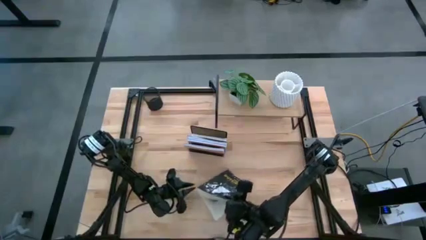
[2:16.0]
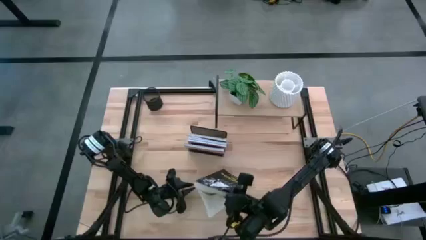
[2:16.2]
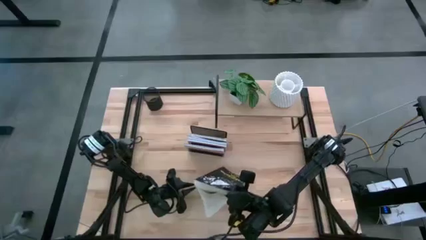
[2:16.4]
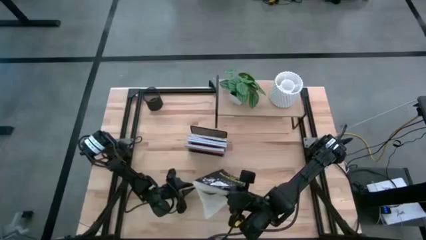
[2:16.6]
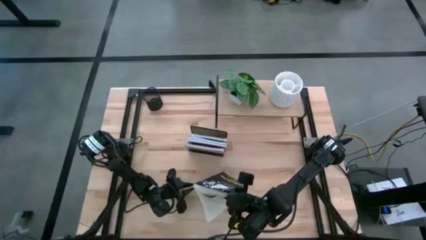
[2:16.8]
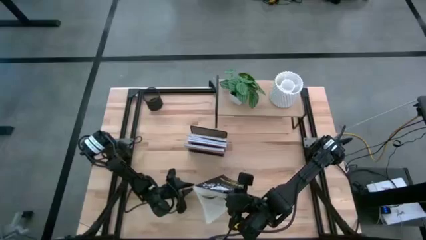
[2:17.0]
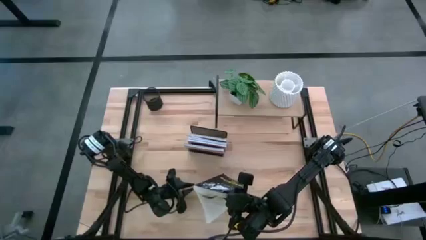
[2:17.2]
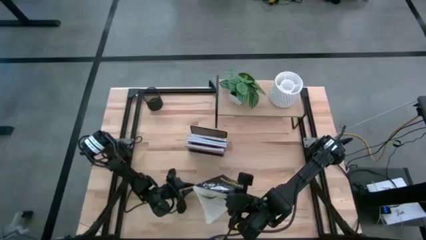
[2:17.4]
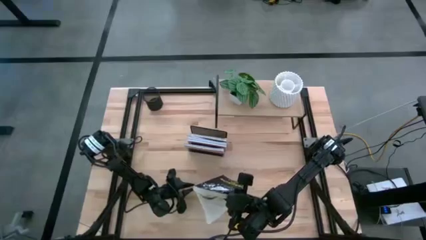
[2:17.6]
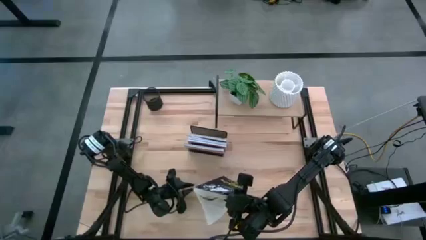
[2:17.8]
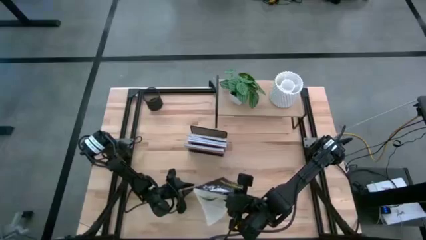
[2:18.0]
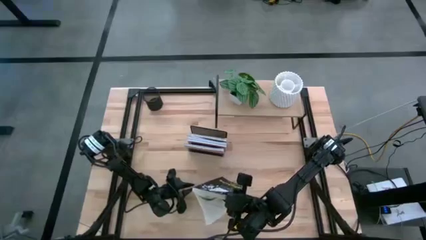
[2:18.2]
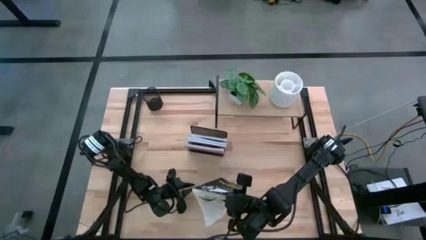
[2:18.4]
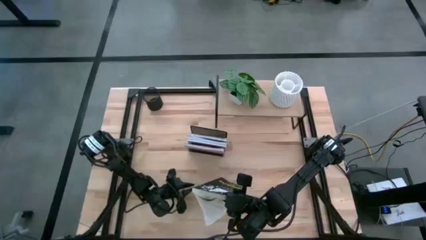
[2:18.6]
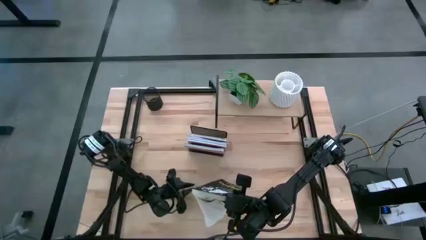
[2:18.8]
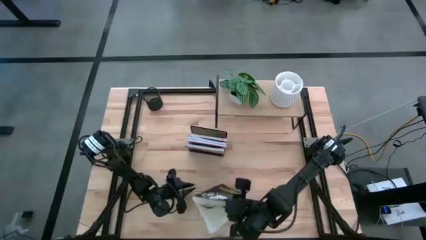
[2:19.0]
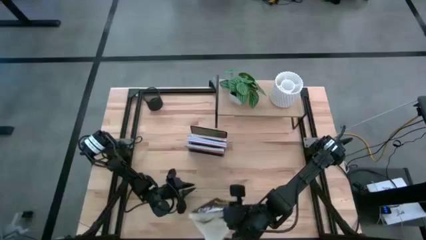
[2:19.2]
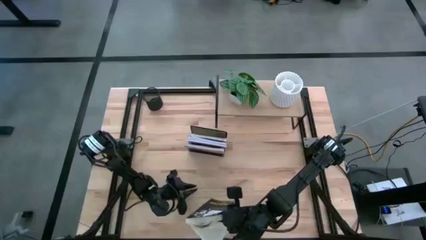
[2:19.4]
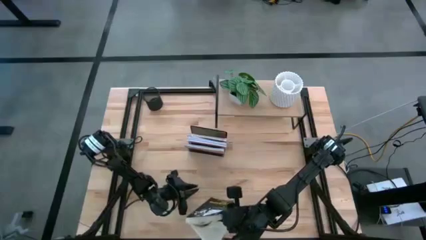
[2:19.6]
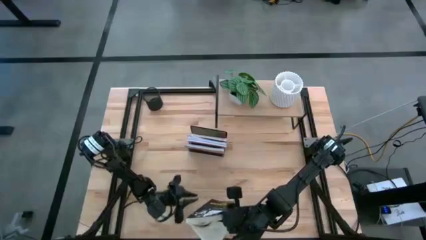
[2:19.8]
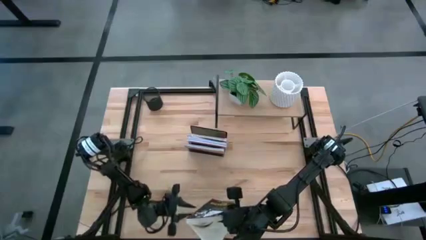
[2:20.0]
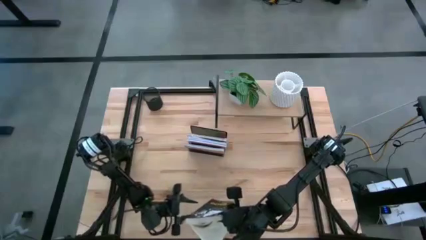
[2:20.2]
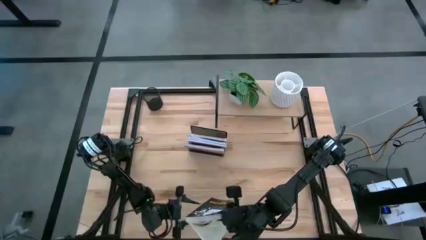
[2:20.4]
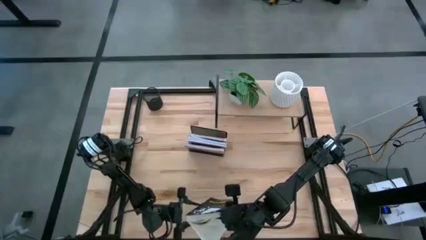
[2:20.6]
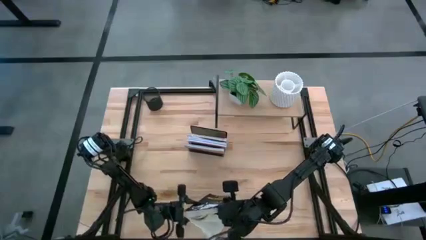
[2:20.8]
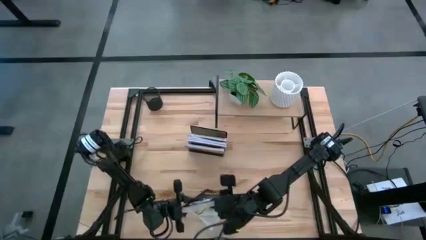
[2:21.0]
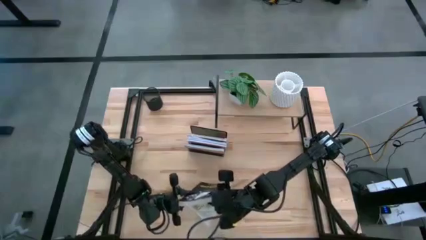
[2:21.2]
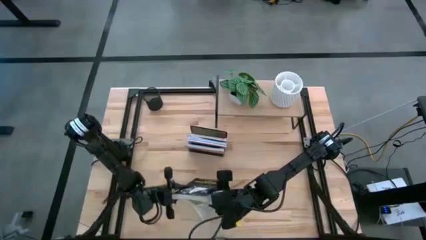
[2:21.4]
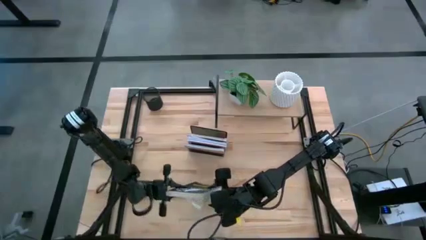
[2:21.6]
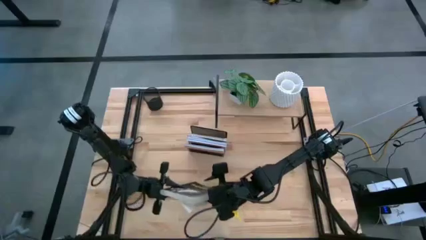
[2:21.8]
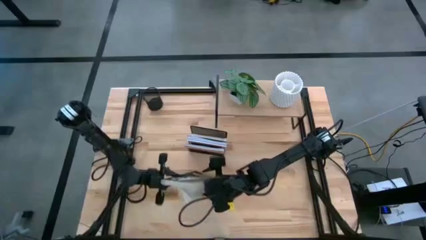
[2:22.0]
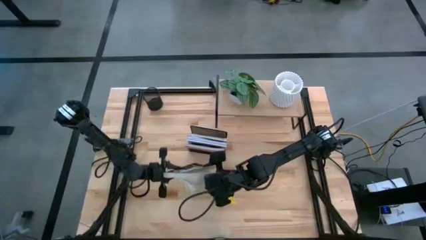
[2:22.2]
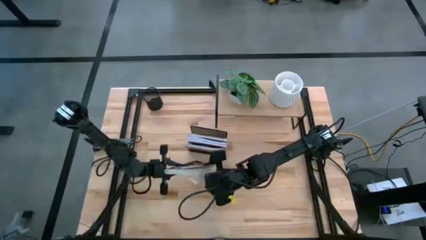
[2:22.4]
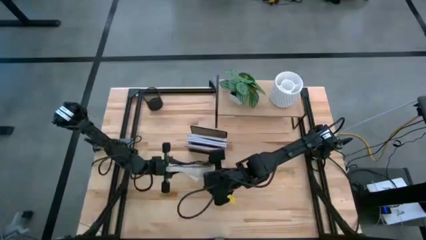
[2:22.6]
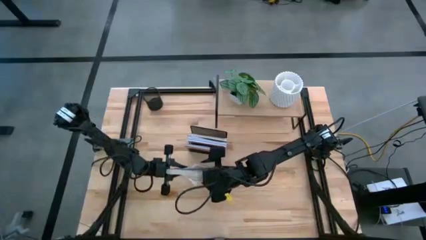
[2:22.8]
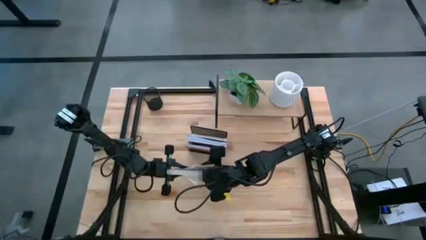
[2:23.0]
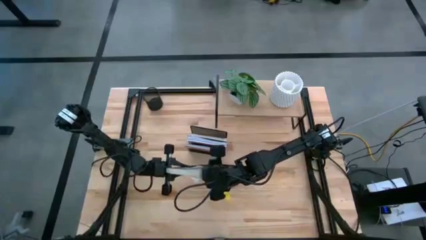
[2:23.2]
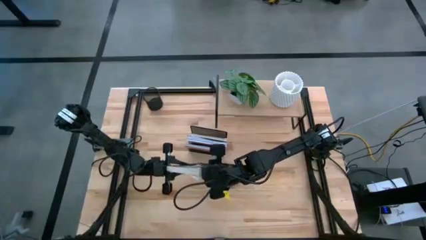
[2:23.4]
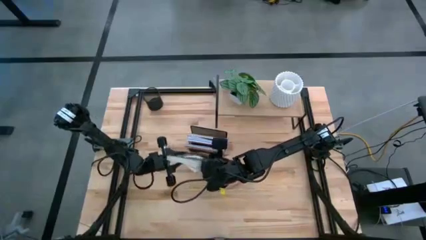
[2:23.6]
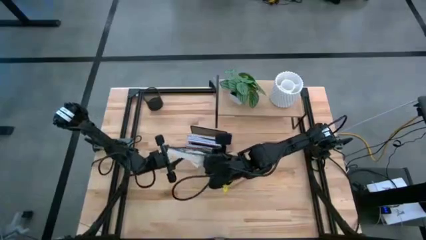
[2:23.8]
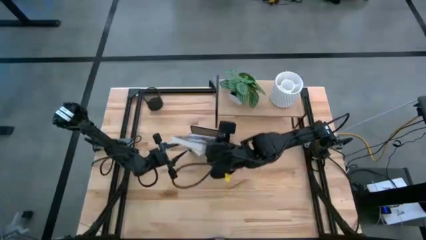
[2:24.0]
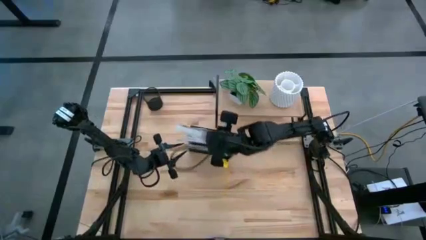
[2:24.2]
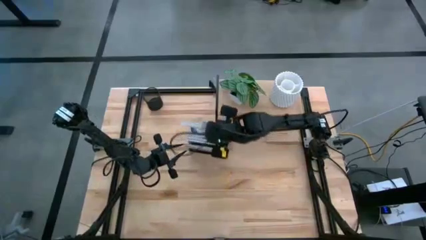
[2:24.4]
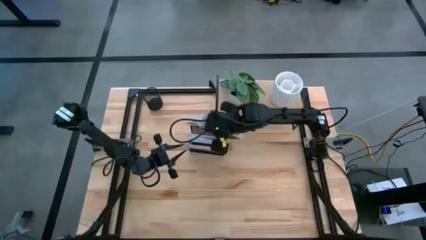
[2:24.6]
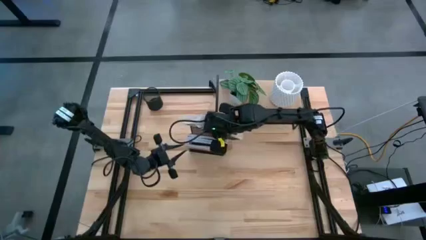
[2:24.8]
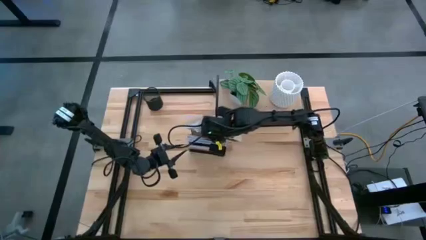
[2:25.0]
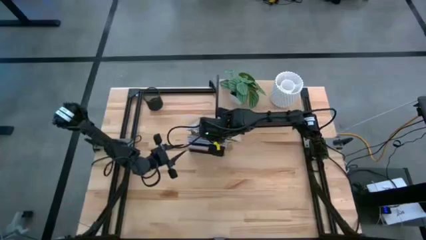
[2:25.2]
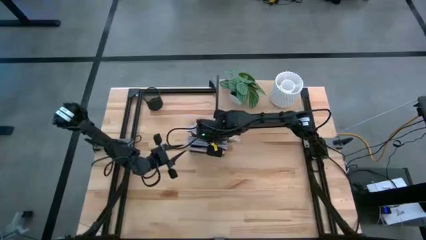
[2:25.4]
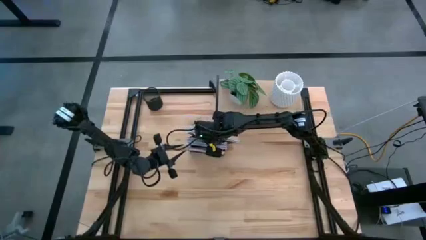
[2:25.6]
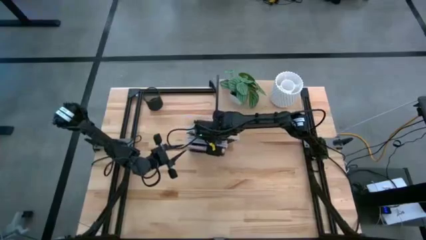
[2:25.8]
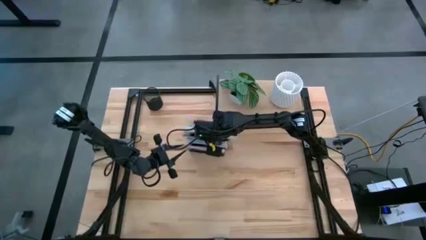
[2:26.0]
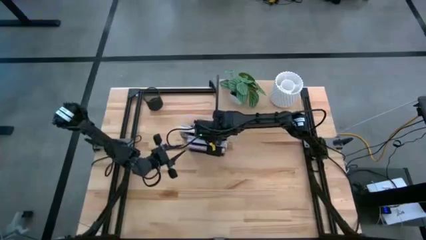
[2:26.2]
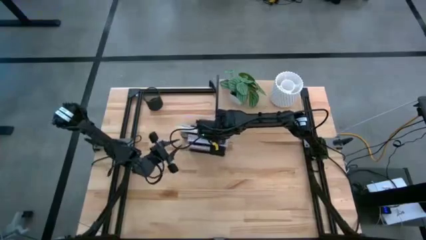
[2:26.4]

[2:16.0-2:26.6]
Task: Stock shelves
Put the black book into the black mesh bookshelf
